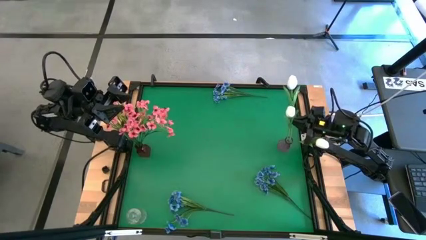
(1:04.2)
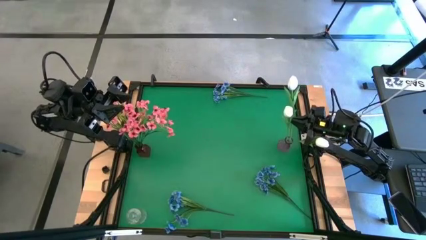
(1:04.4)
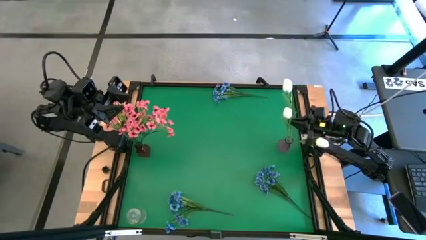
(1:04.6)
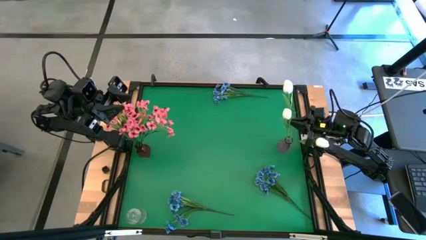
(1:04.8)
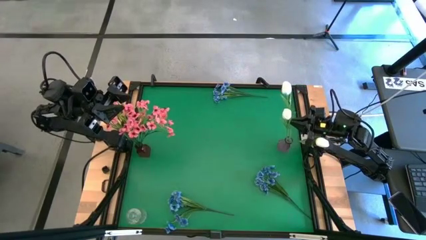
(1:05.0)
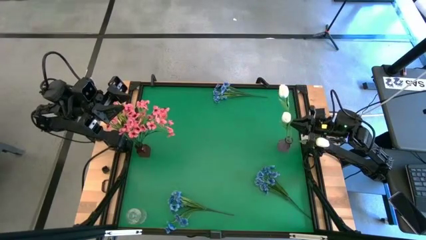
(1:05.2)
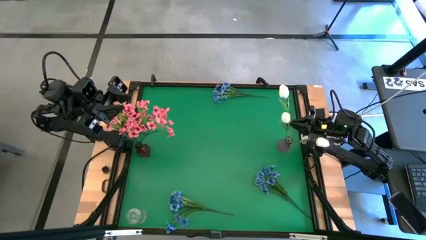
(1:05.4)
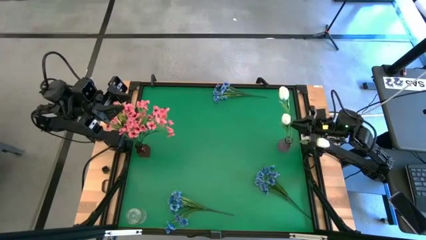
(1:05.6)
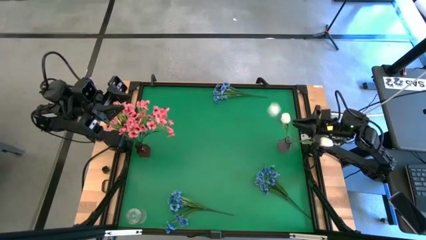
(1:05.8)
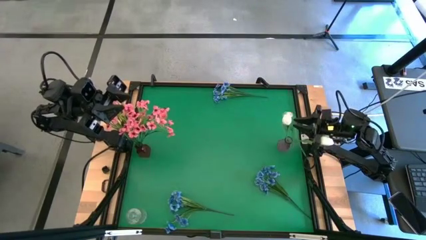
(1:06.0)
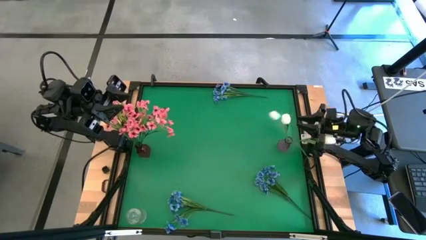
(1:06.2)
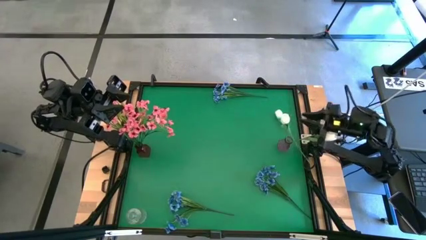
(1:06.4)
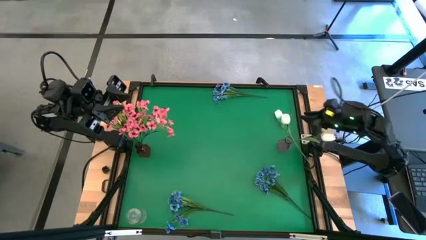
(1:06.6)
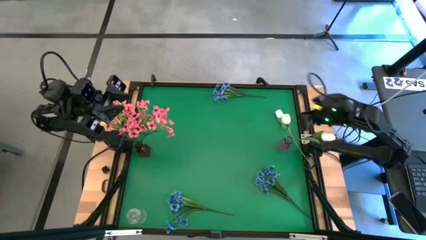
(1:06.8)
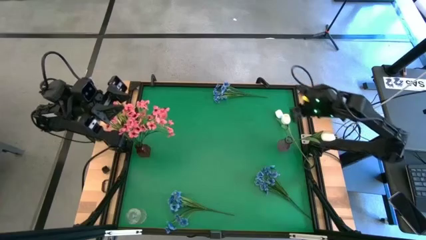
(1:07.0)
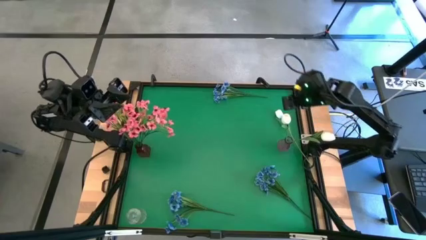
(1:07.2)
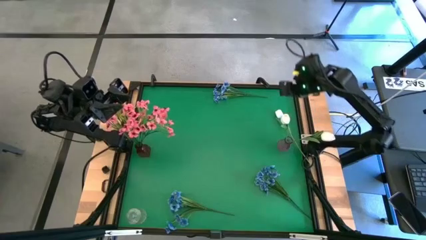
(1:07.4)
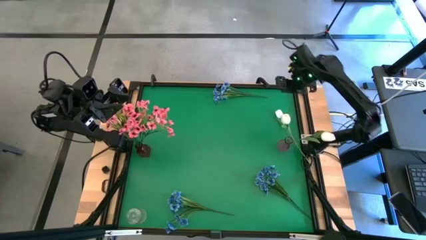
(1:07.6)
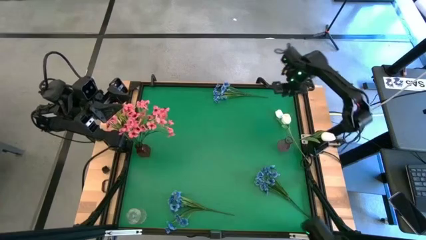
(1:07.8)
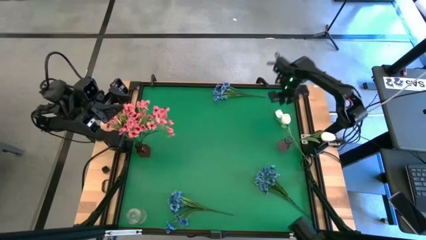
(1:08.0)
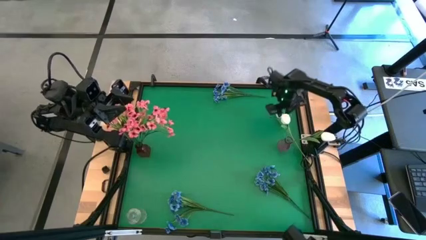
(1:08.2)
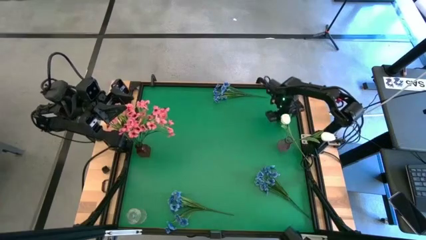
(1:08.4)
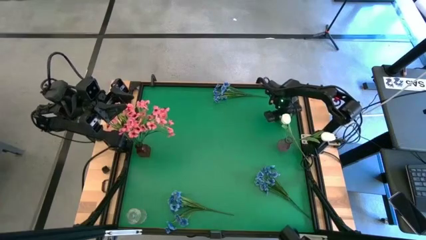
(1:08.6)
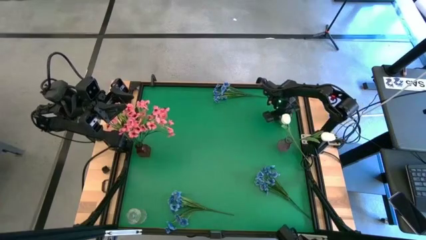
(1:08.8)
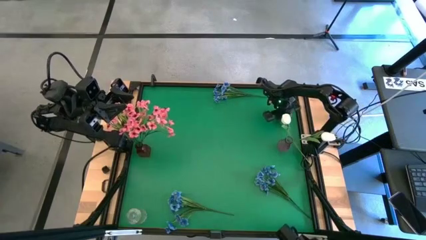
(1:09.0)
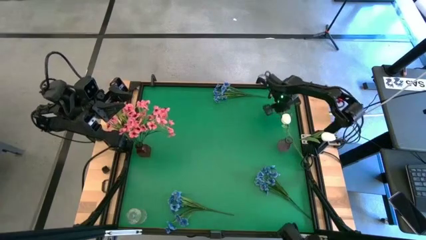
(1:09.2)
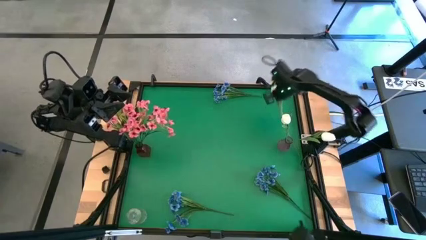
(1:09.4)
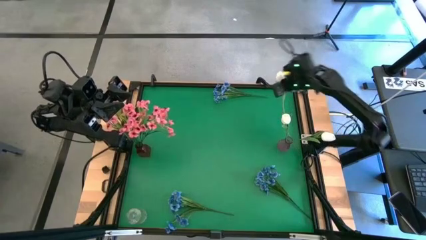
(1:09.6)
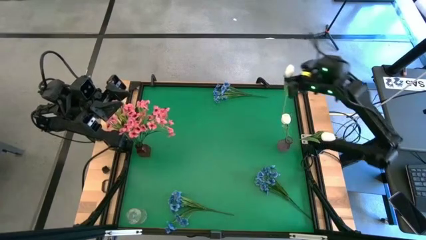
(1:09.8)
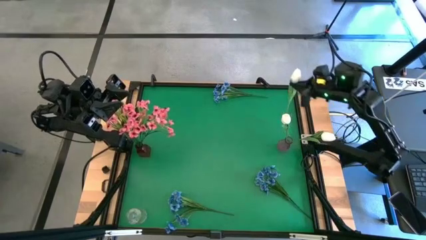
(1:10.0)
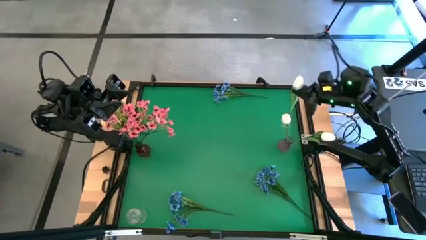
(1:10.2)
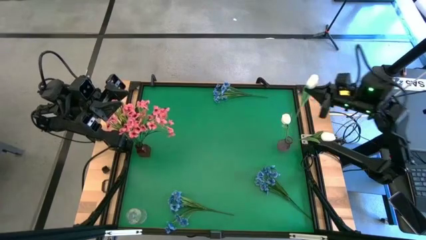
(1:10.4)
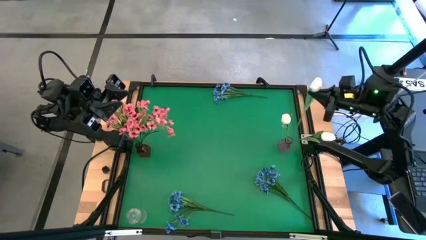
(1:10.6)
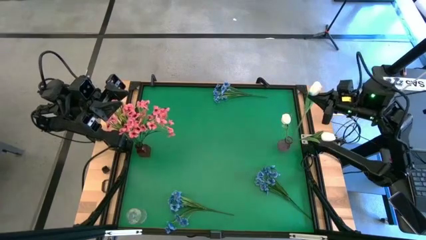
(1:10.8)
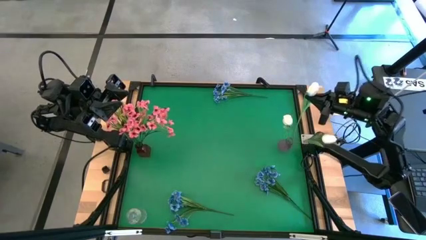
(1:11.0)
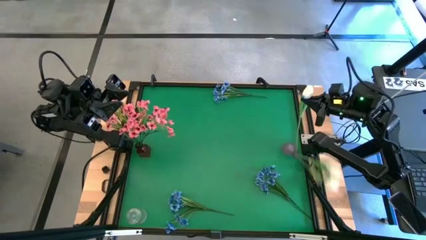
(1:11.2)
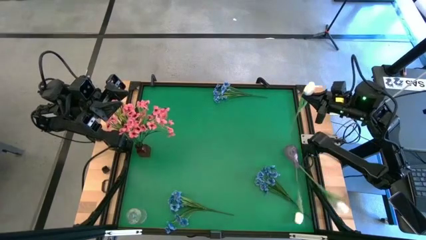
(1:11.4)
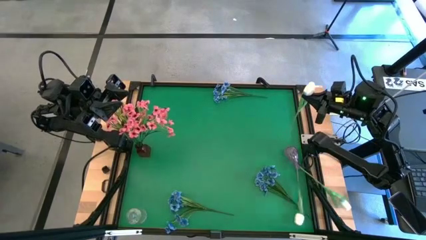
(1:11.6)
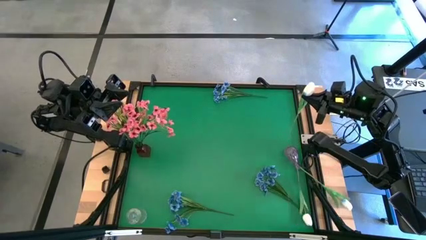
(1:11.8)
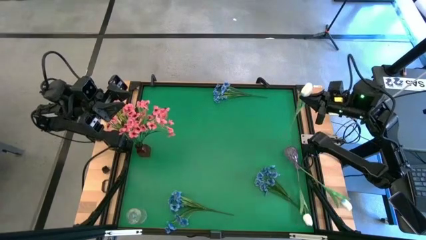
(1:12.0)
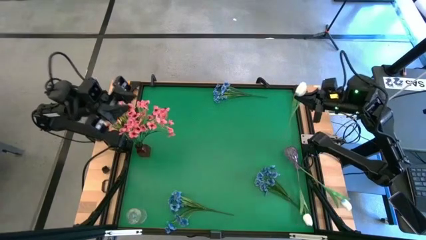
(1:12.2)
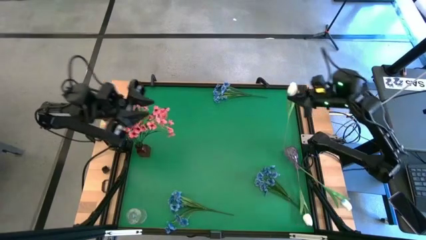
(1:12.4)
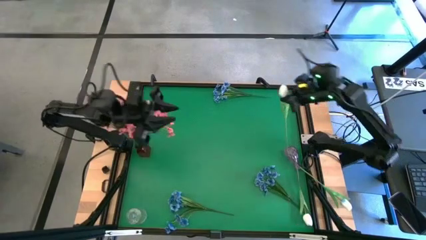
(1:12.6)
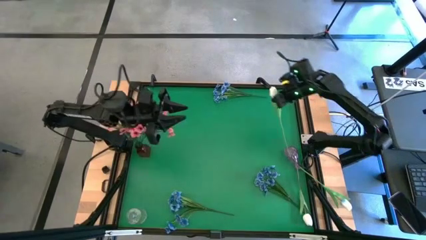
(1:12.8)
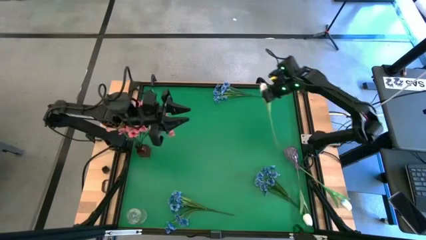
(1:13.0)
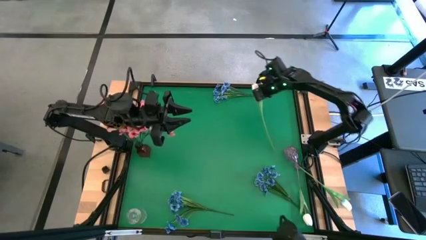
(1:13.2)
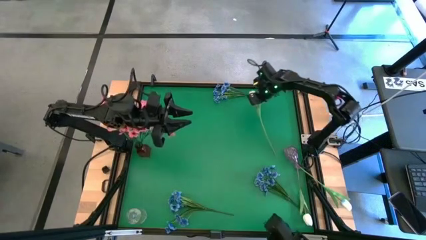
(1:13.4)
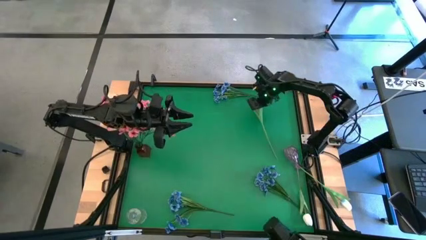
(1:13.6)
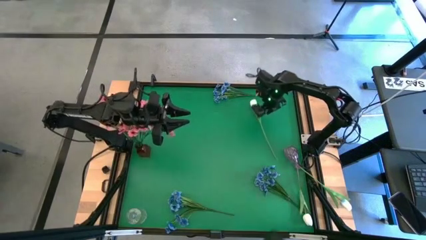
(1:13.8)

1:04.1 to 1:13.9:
Task: Sort flowers into vase by color
Put the white flower into the violet vase

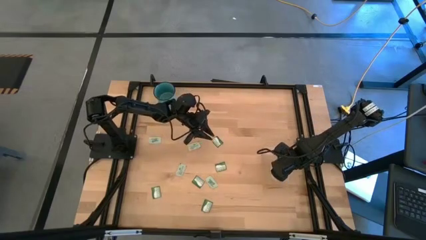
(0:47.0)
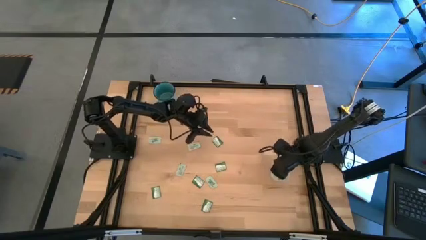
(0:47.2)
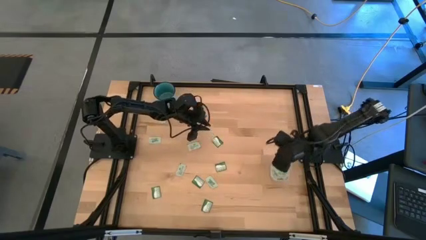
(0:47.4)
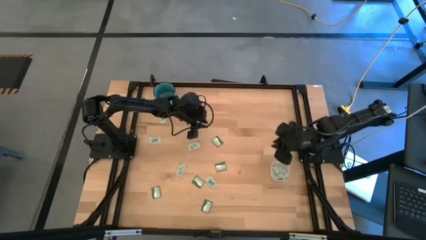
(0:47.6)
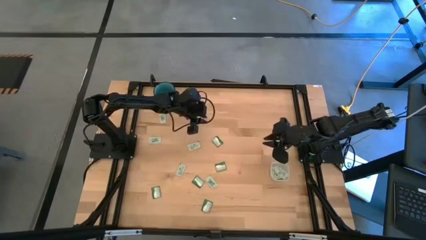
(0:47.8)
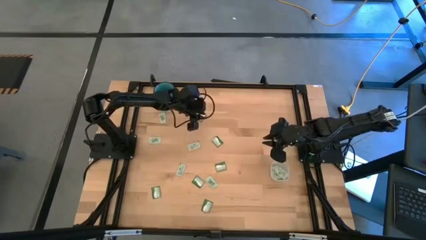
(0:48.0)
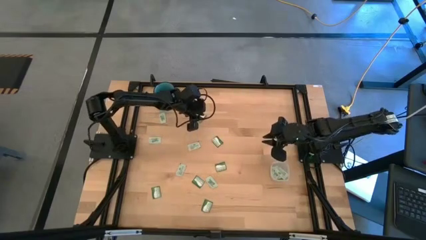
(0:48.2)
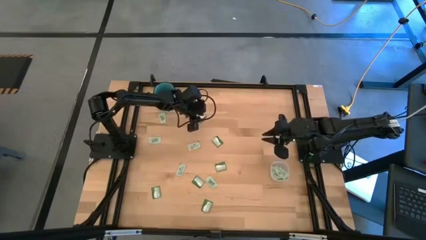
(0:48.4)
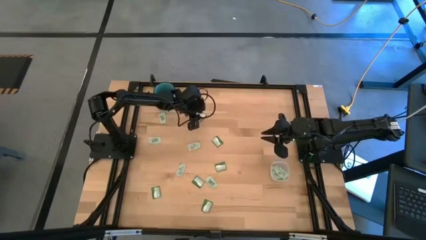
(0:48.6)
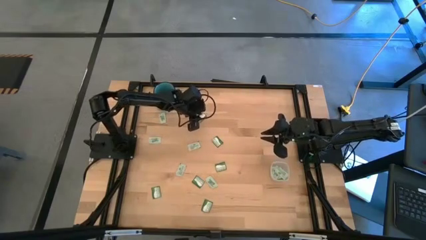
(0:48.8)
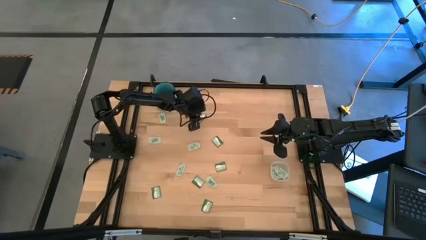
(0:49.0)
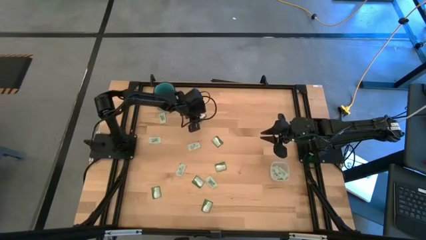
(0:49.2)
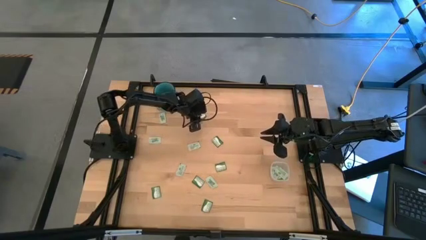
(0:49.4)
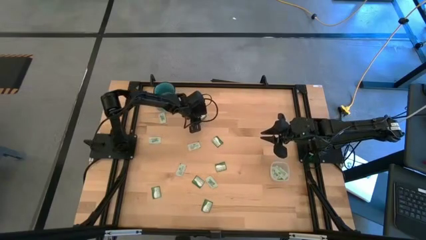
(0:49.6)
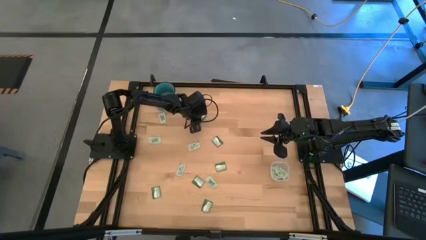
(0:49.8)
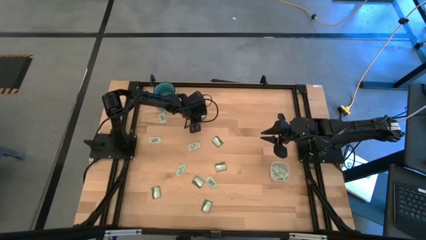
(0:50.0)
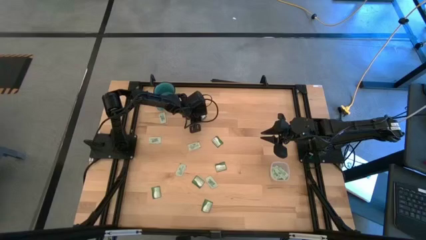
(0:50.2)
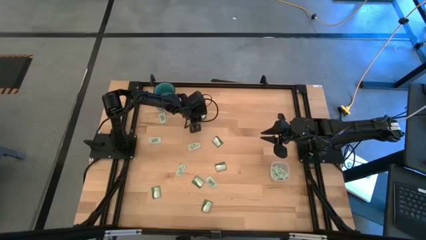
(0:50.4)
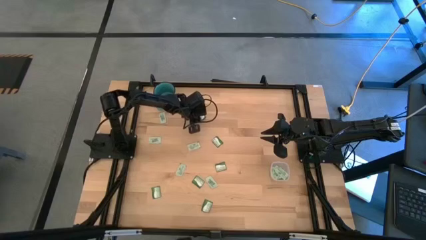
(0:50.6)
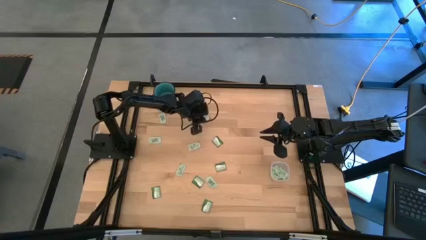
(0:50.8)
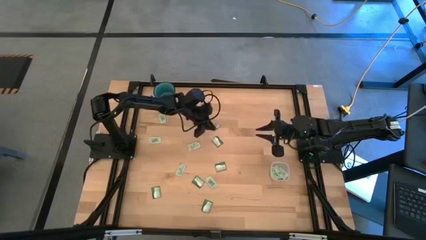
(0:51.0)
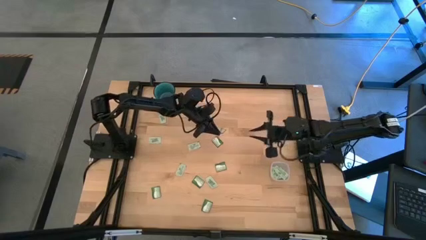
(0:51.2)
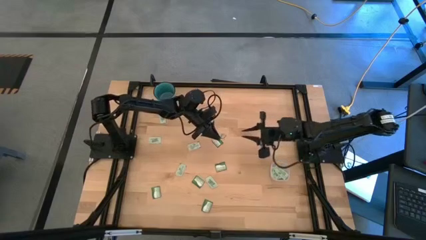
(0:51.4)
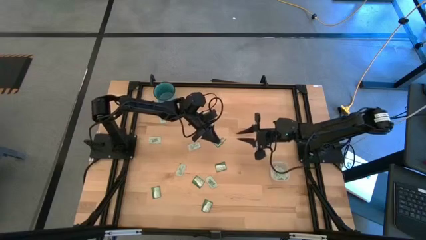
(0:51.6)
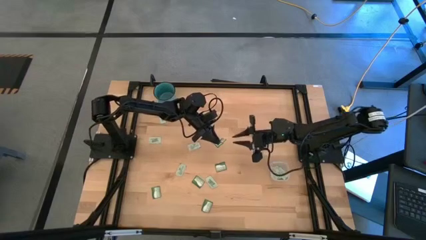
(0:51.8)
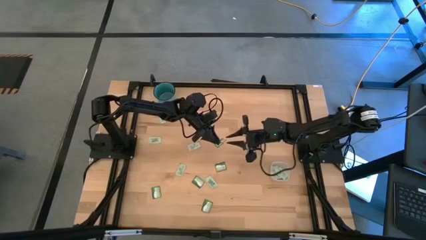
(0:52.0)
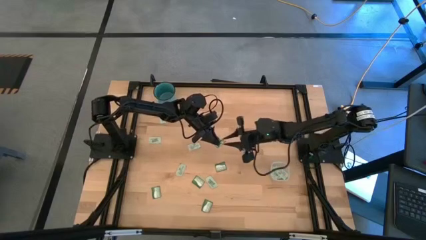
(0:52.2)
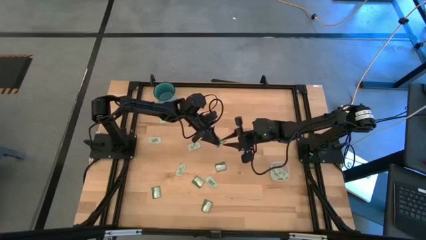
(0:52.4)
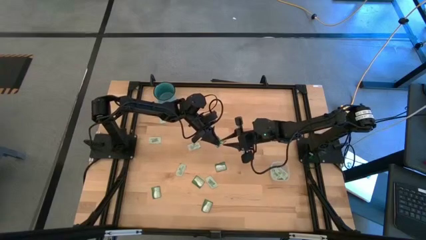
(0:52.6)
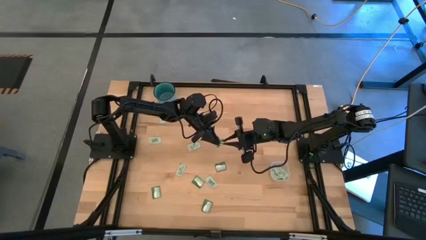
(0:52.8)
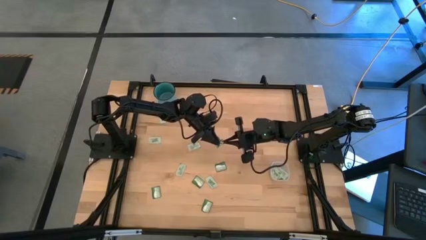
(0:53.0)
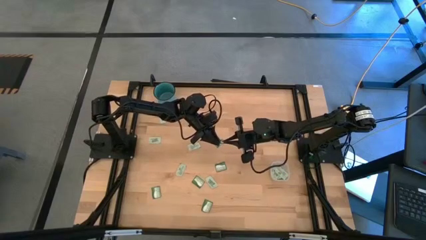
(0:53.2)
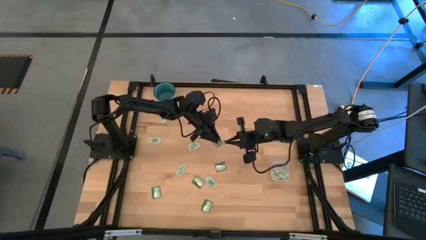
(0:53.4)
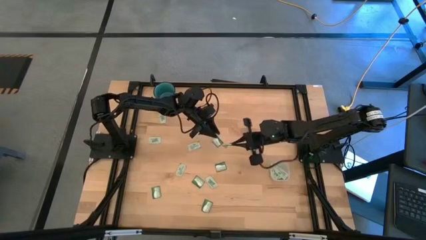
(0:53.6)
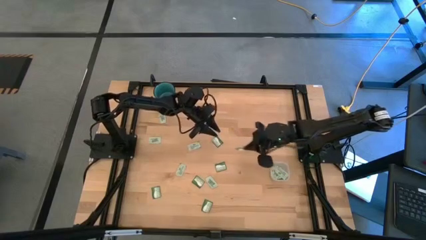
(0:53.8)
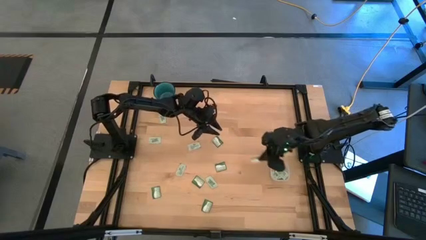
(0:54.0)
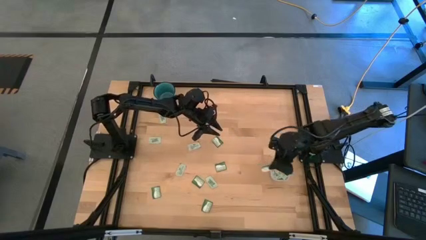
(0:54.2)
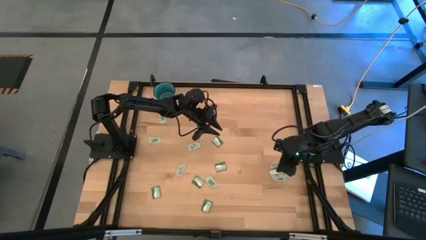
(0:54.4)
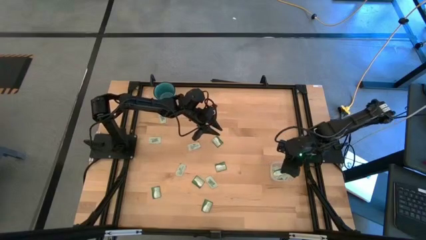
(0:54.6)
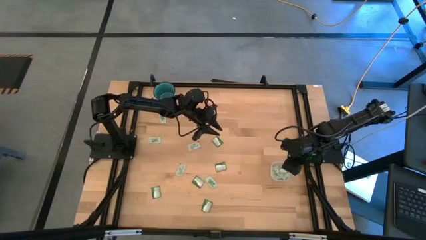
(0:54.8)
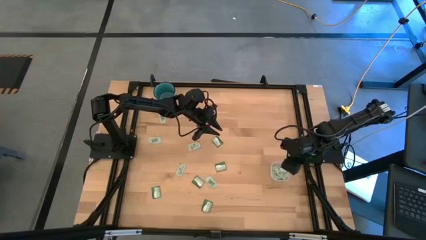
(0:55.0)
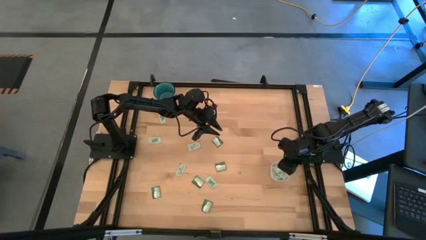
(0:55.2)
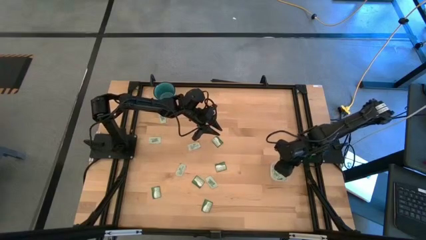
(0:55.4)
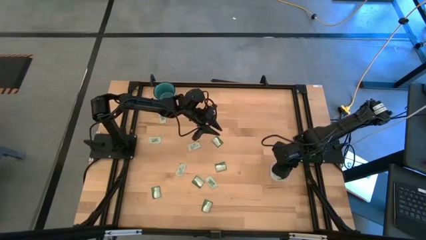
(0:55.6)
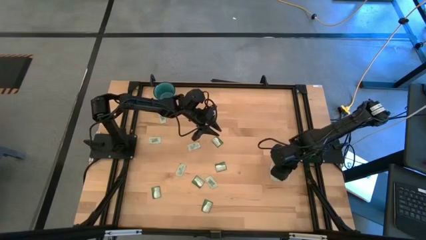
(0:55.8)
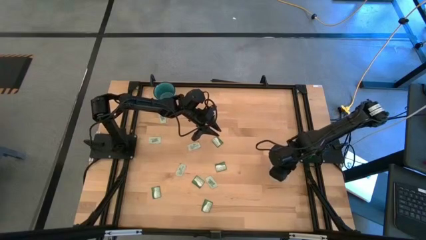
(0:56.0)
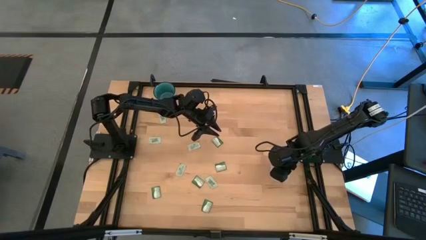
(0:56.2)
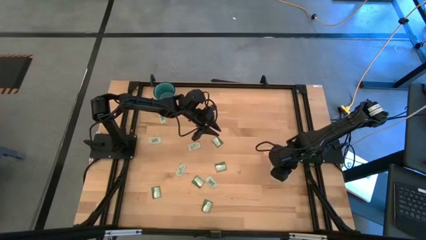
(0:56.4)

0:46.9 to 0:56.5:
Task: Pick and place items into bin
Put the green stevia packet into the transparent bin
